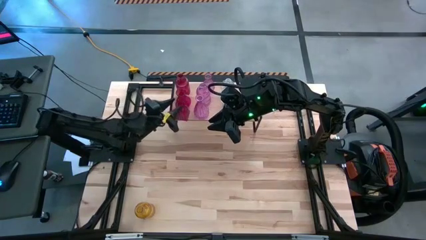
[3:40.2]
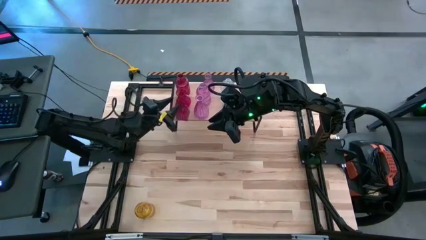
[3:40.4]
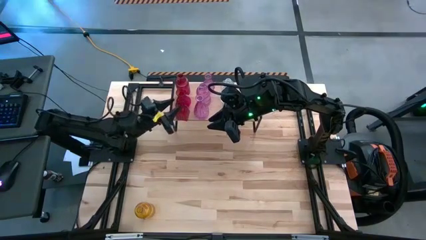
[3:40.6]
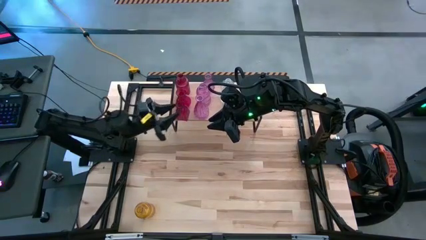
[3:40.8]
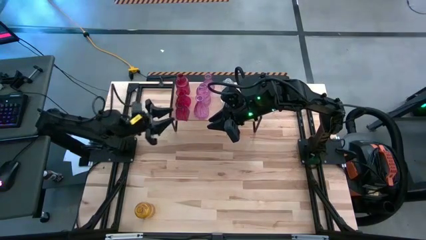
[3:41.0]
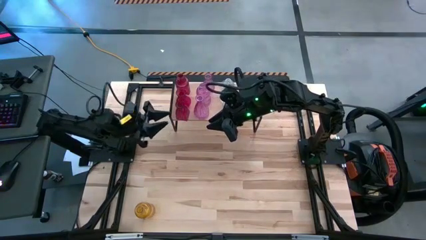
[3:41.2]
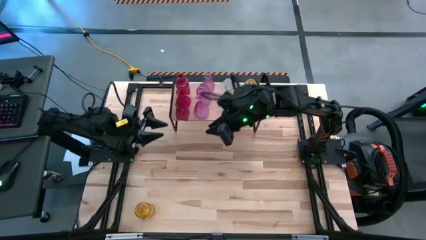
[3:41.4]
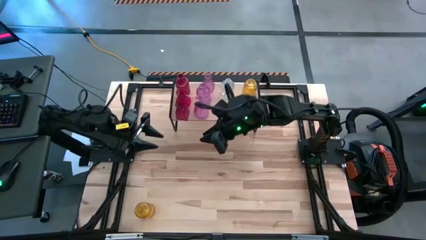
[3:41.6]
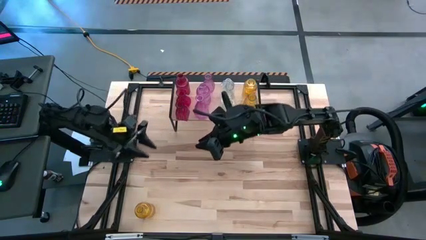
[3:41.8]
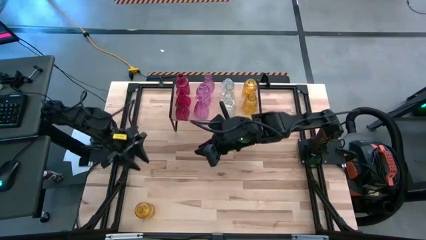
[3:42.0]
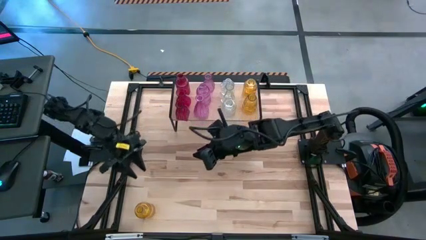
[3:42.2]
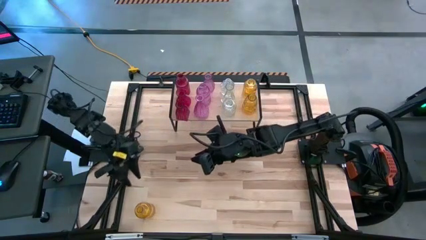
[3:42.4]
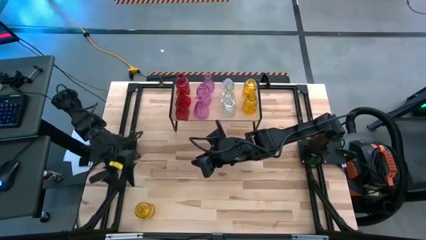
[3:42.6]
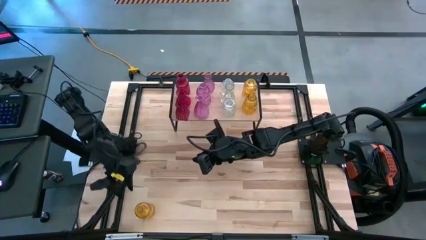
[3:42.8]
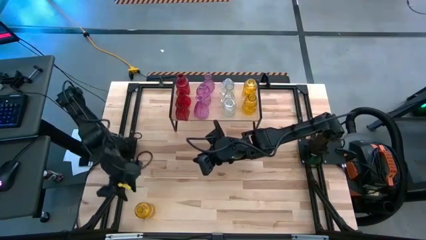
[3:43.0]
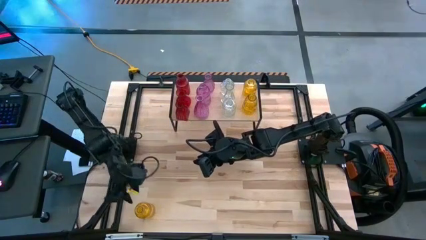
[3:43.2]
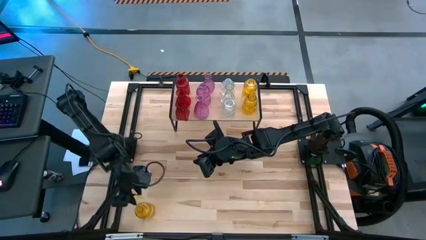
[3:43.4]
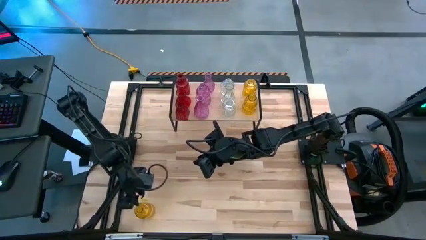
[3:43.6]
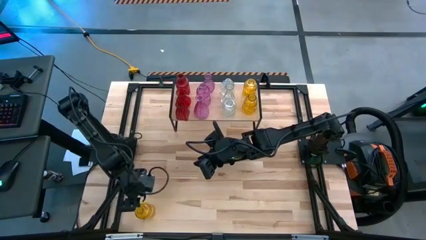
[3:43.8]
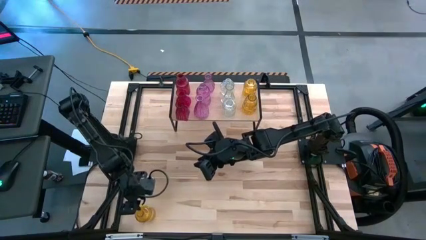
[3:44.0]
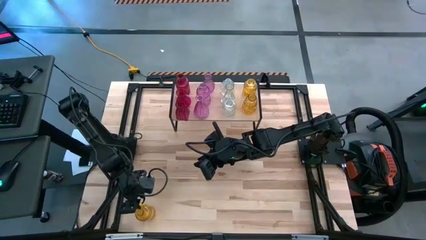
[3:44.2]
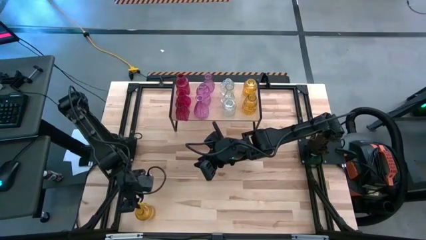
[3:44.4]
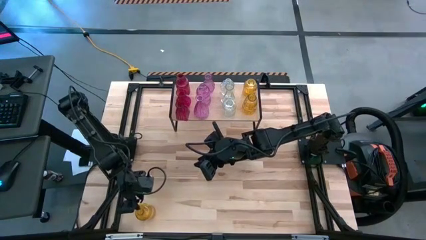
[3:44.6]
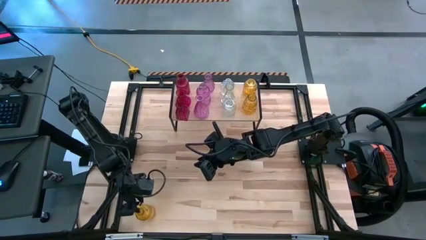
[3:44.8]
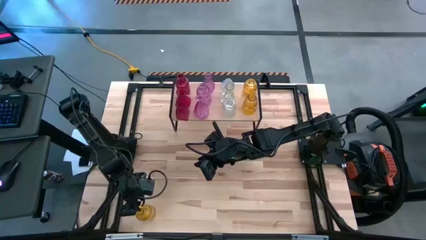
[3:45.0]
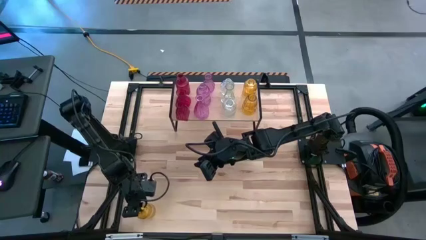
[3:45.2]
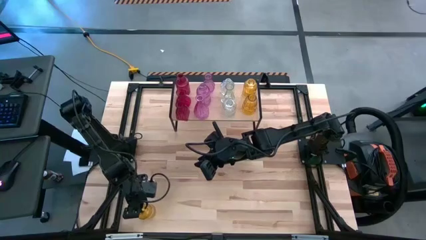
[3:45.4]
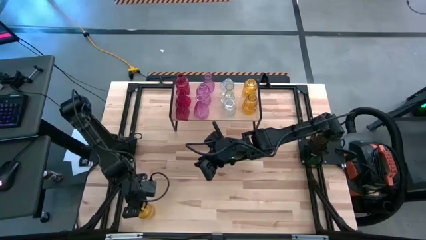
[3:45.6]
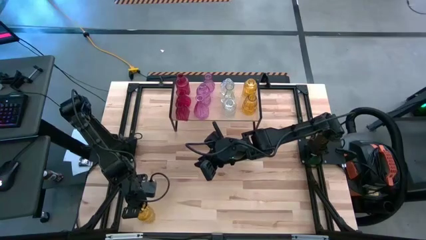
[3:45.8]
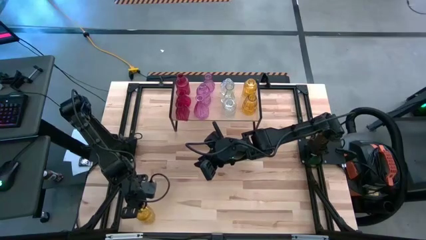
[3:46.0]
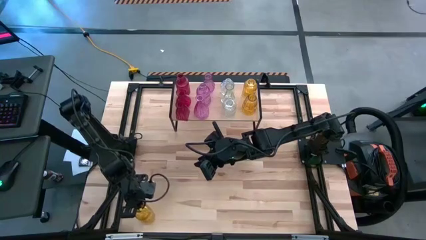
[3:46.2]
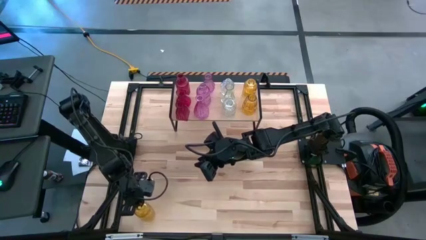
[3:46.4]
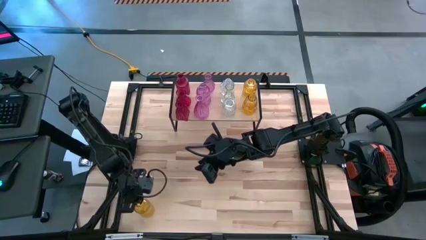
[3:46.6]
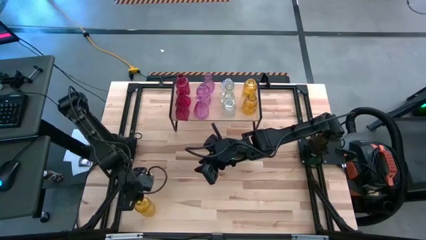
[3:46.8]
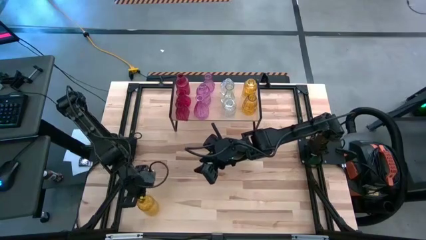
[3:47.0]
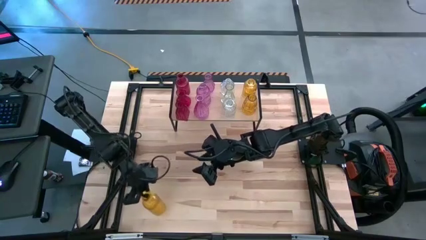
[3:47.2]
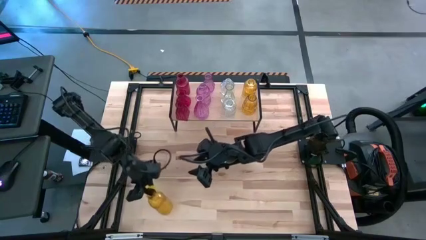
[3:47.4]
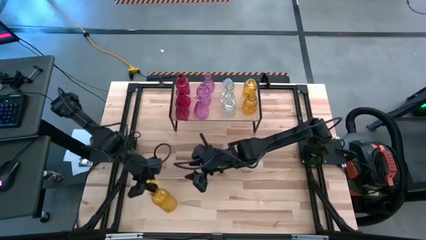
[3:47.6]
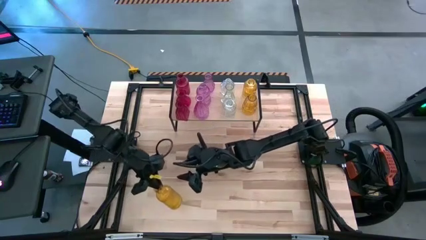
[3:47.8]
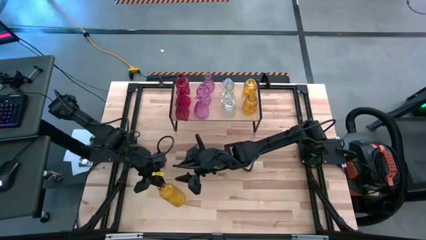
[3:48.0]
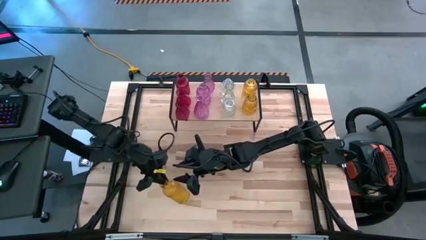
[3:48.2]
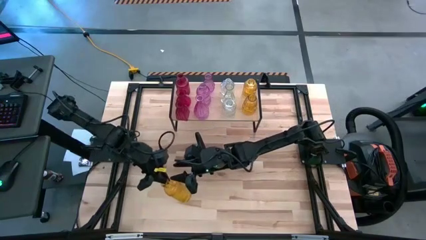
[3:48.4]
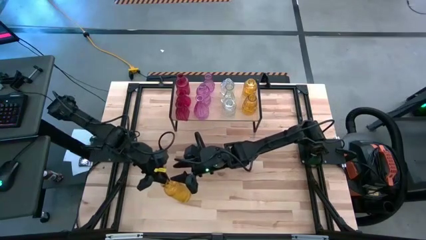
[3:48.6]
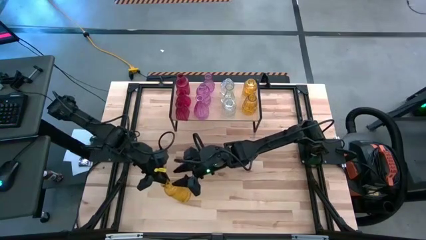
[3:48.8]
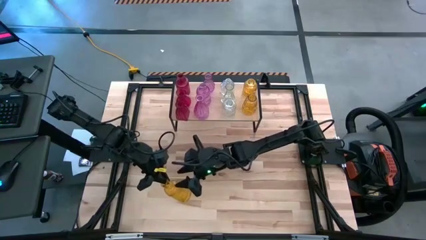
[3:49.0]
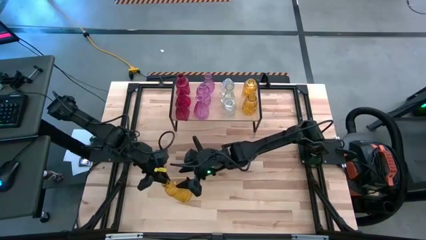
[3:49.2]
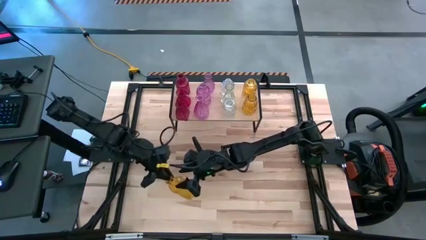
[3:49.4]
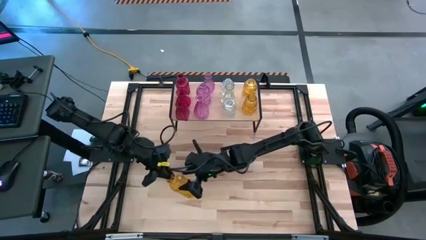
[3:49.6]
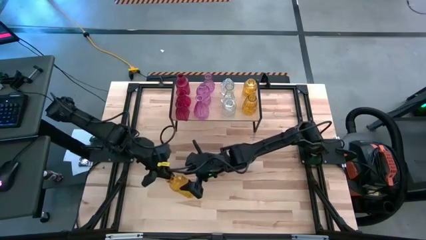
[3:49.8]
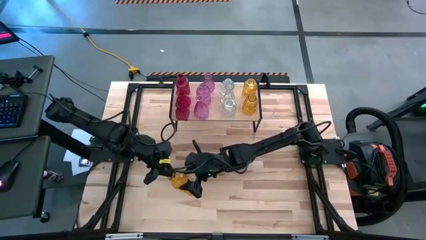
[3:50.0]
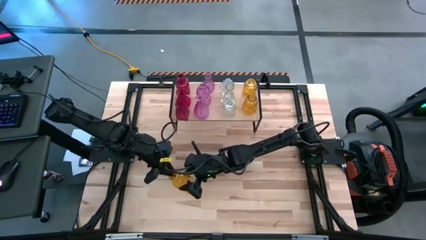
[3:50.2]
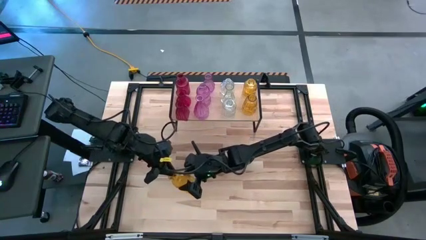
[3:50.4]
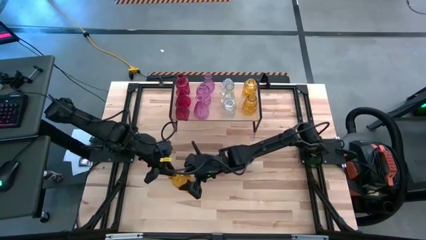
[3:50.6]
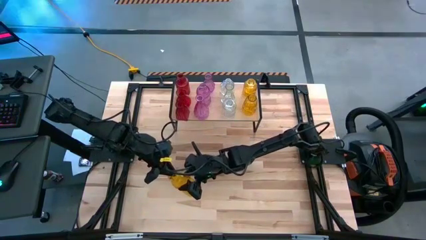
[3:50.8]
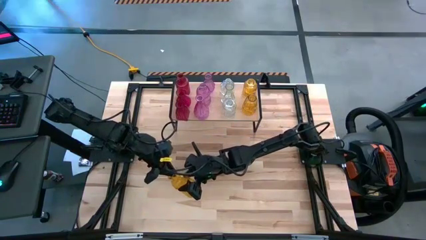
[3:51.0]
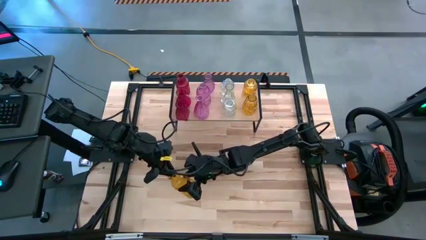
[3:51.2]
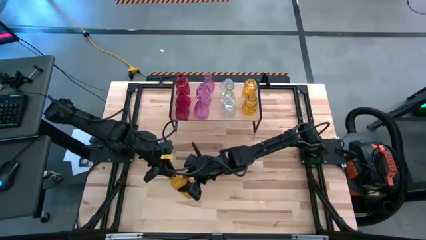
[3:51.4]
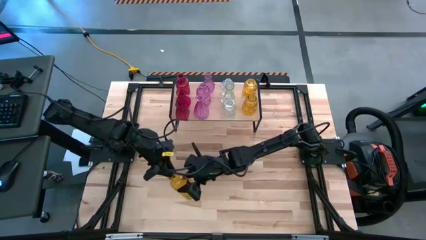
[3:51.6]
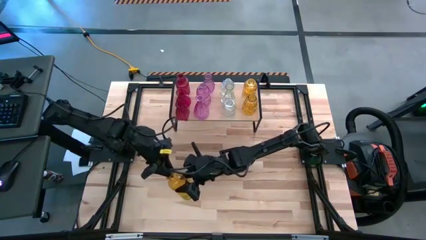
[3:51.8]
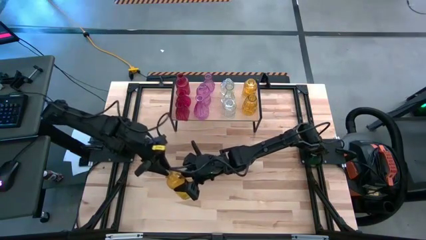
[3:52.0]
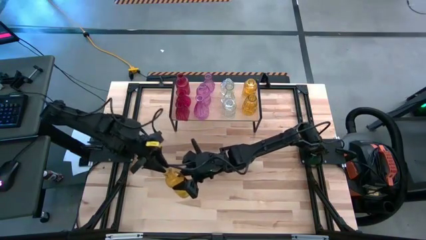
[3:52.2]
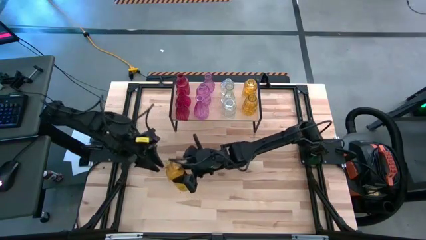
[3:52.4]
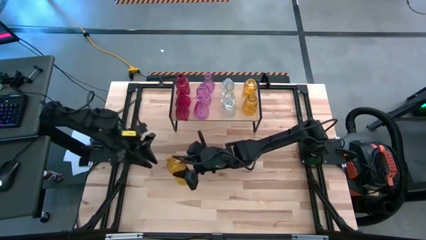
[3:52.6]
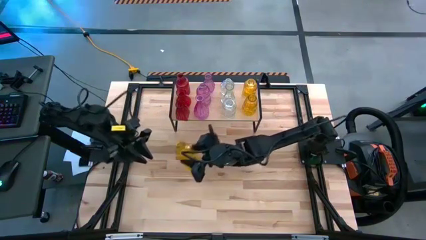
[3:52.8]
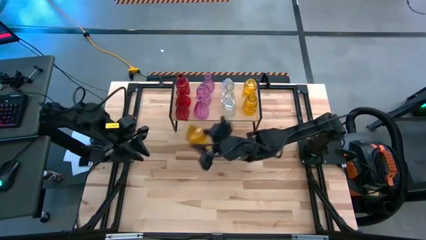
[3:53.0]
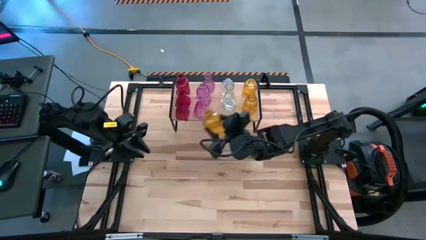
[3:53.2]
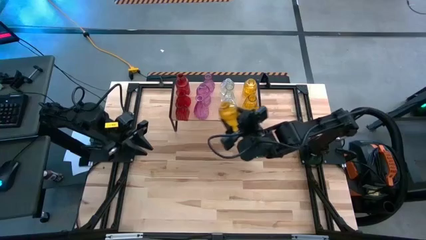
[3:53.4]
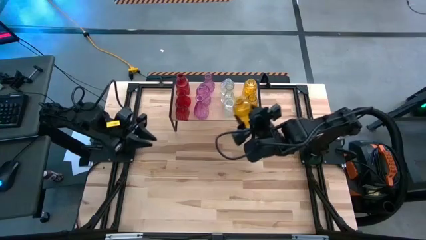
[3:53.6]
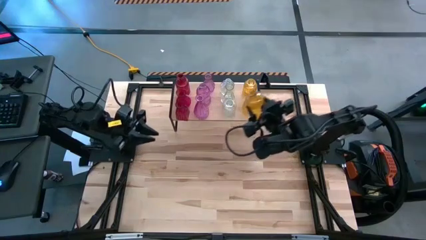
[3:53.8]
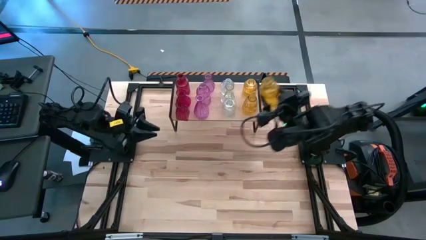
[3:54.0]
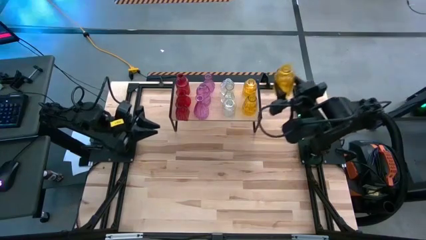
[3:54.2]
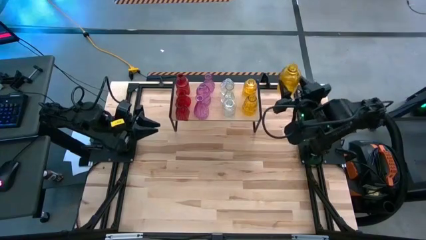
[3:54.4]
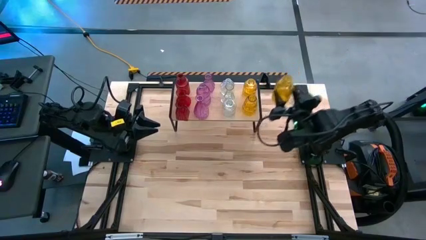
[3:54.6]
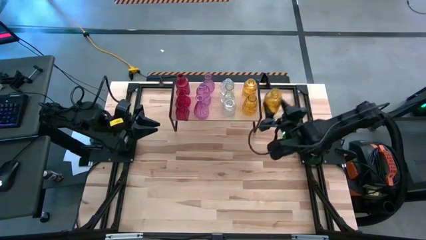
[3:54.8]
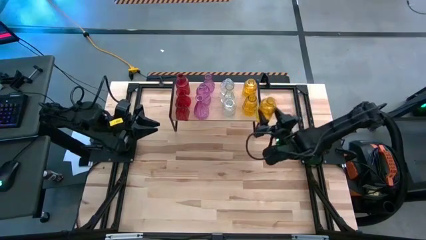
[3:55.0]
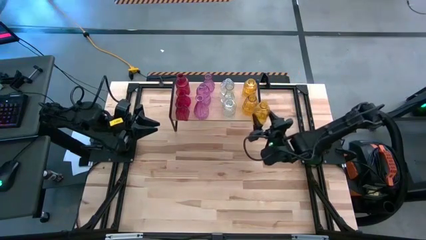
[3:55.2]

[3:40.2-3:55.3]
Task: sort vases onto shelf
Put the yellow vase on the shelf aligned with the other yellow vases
